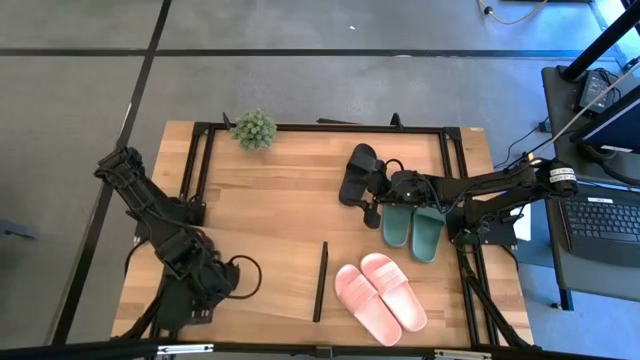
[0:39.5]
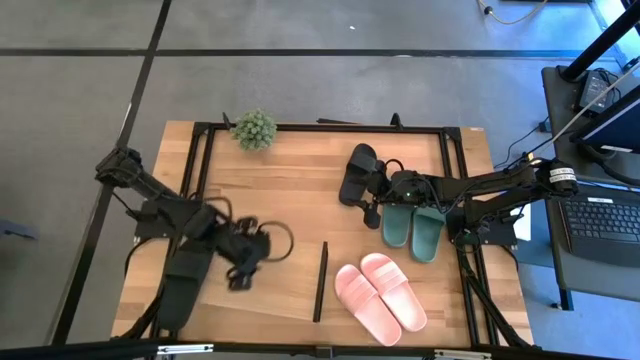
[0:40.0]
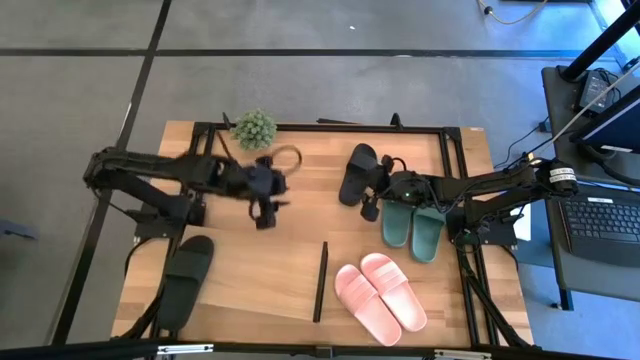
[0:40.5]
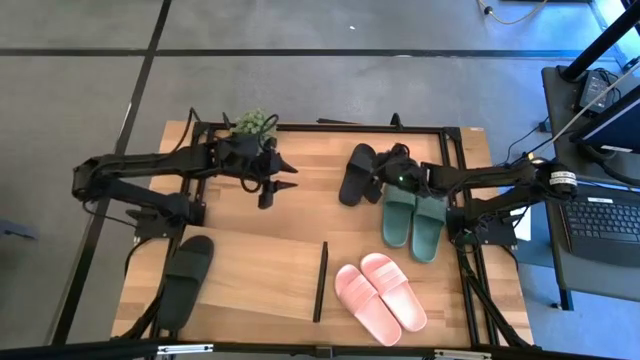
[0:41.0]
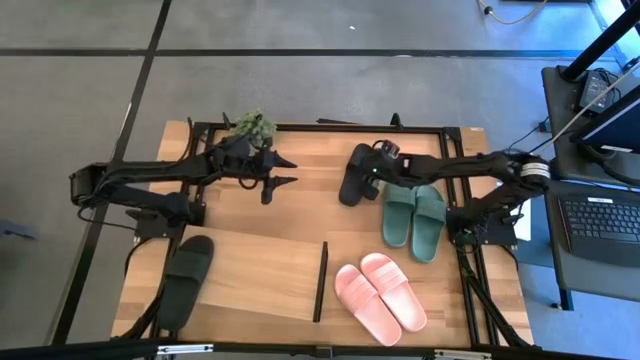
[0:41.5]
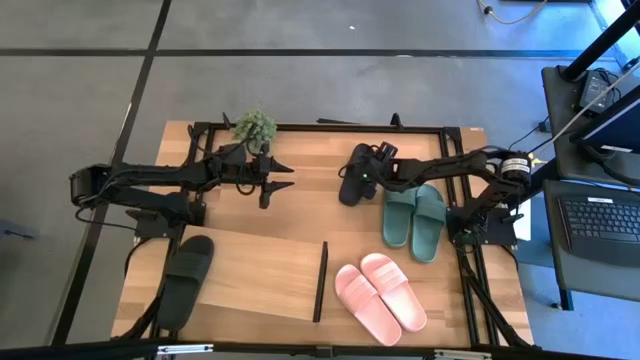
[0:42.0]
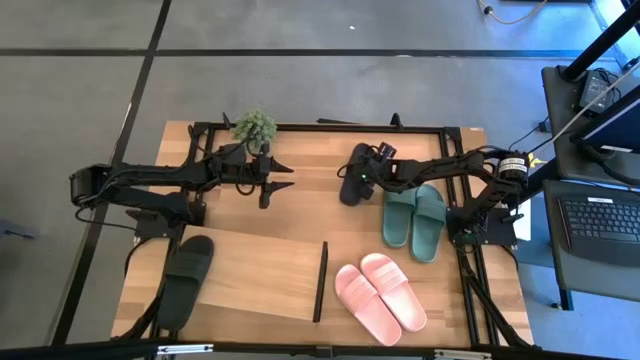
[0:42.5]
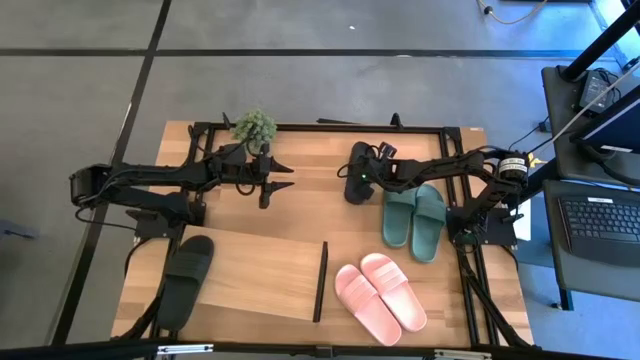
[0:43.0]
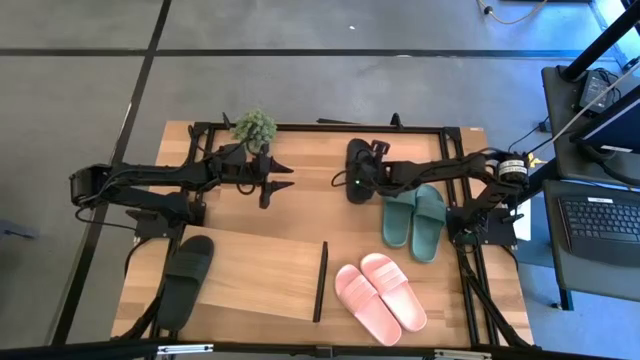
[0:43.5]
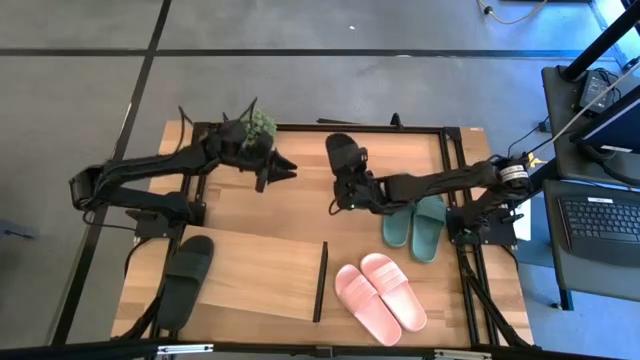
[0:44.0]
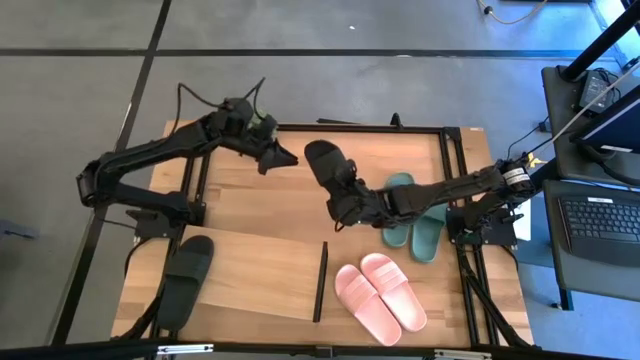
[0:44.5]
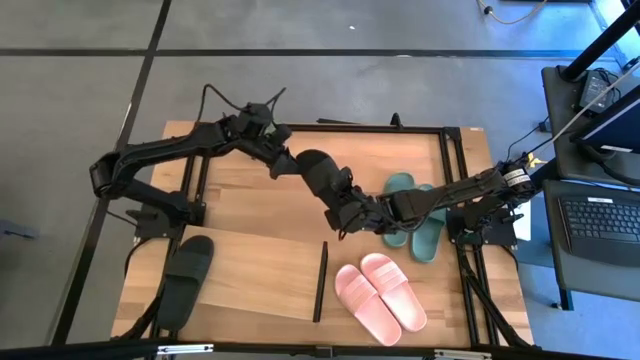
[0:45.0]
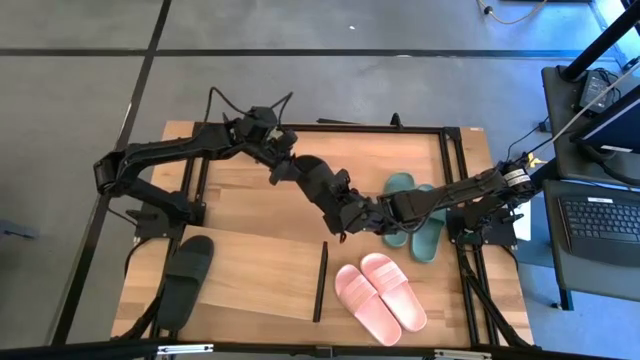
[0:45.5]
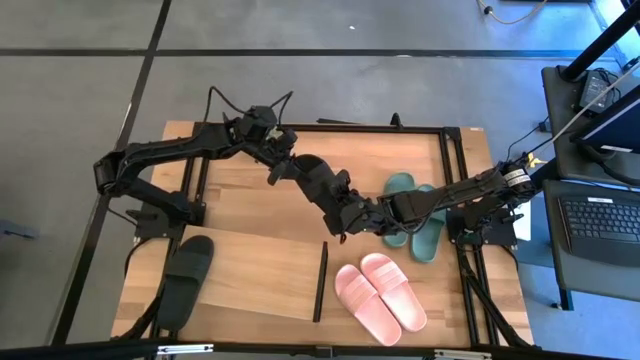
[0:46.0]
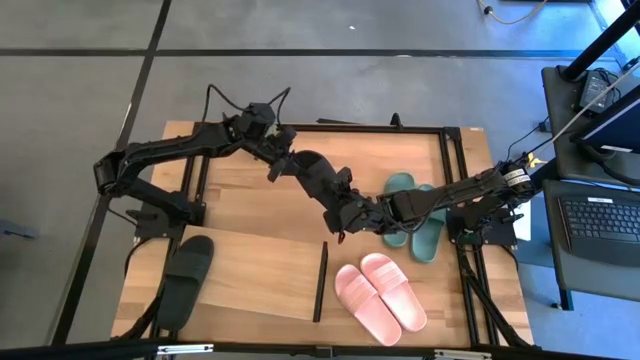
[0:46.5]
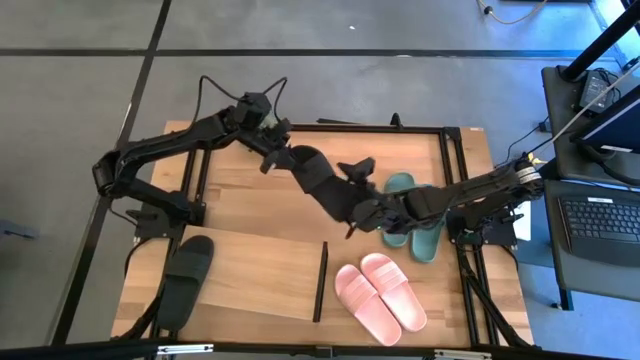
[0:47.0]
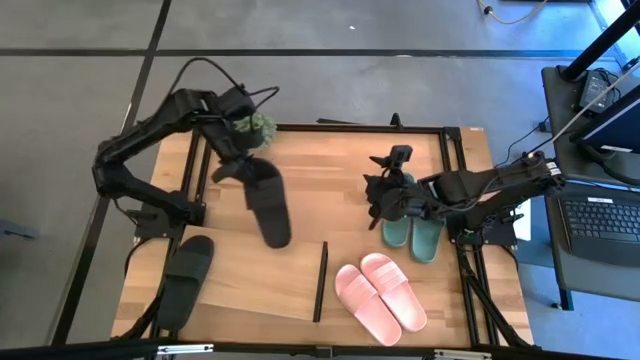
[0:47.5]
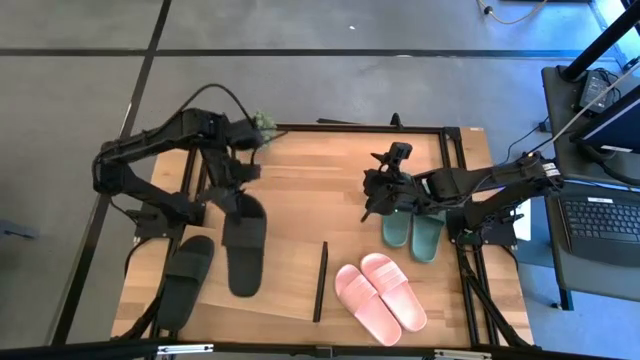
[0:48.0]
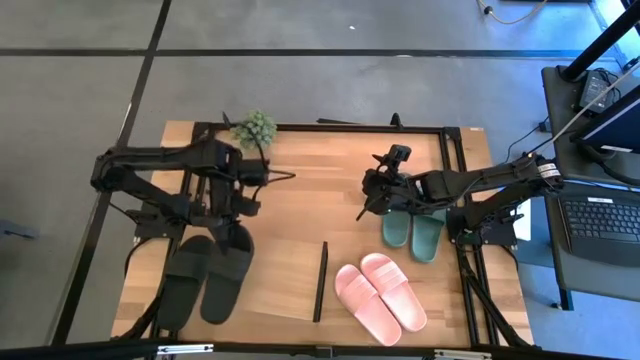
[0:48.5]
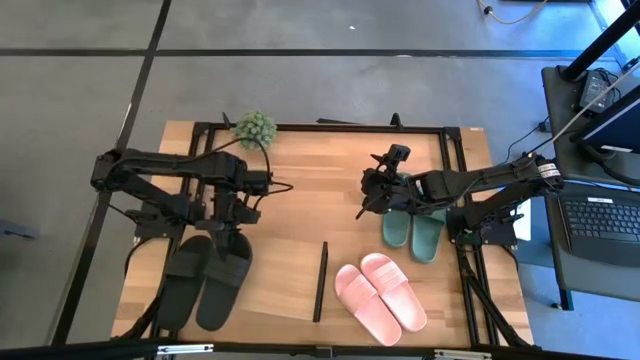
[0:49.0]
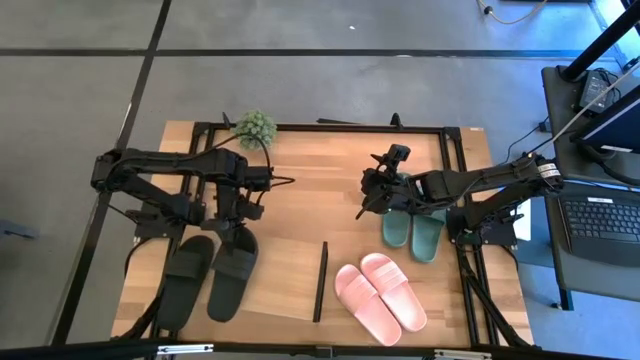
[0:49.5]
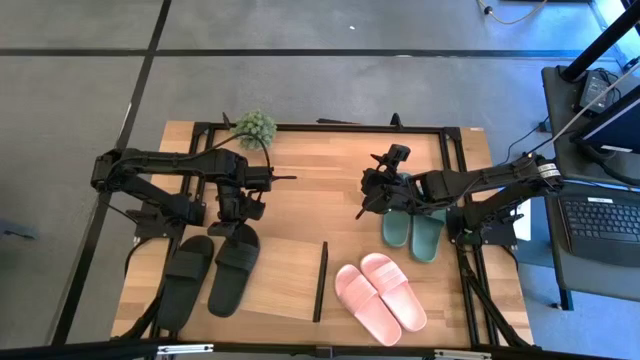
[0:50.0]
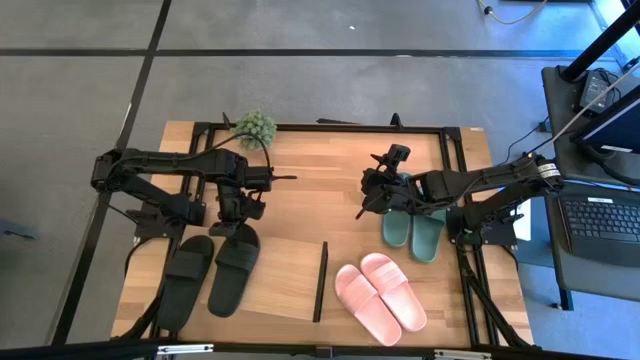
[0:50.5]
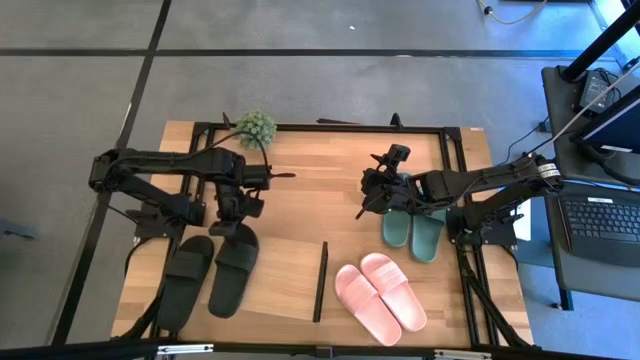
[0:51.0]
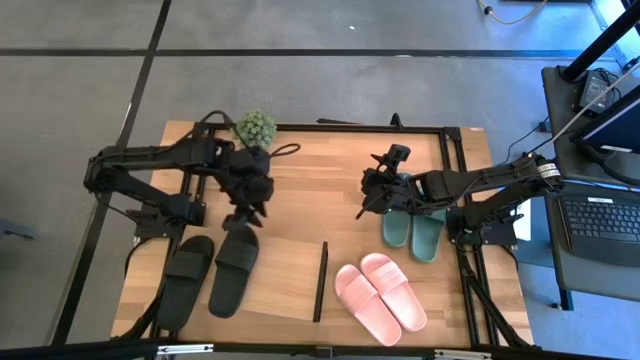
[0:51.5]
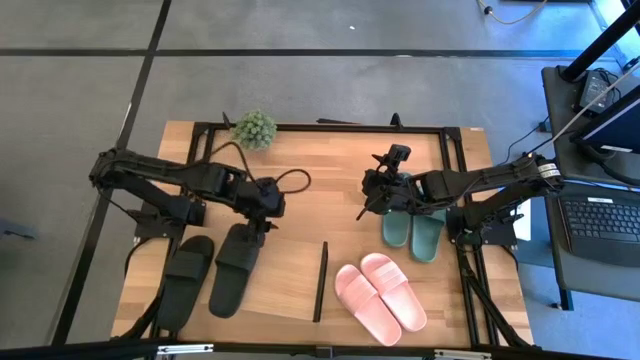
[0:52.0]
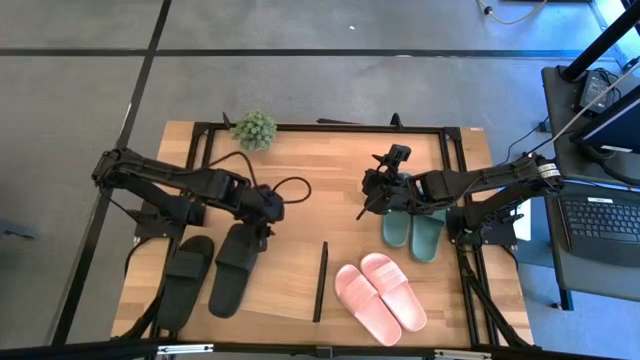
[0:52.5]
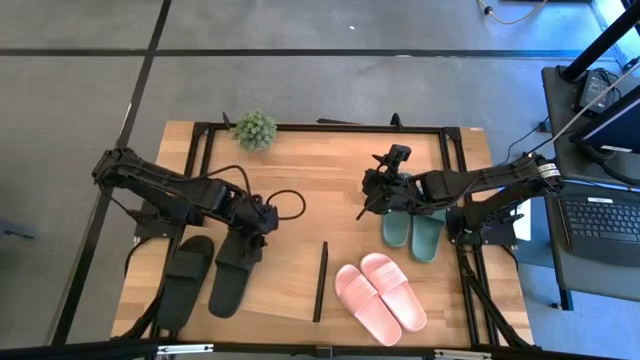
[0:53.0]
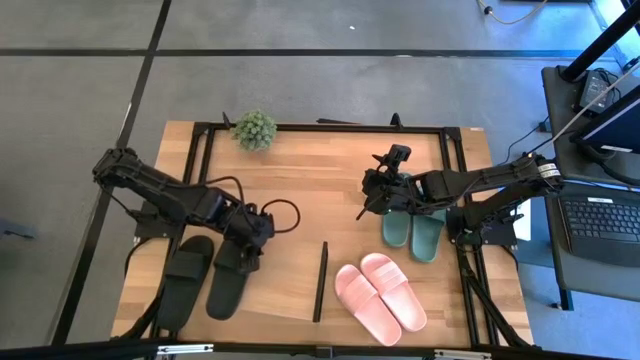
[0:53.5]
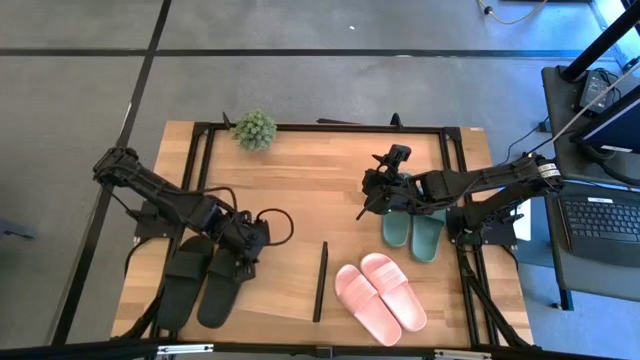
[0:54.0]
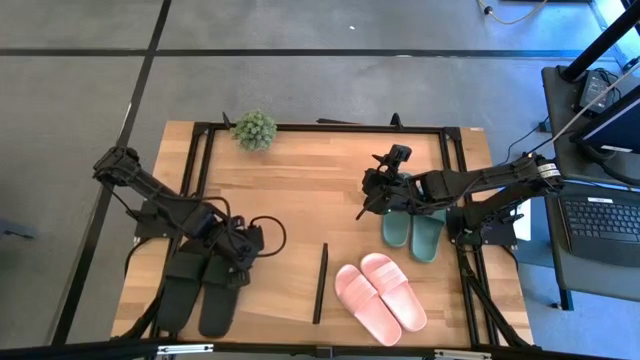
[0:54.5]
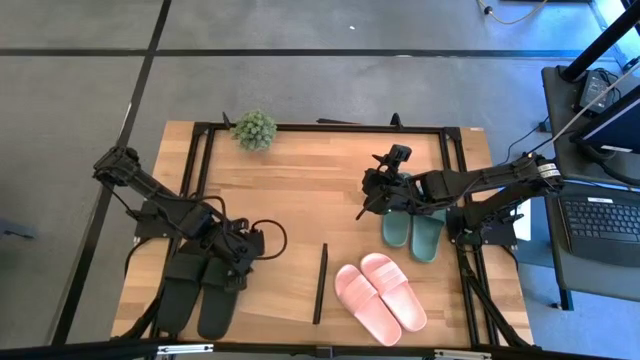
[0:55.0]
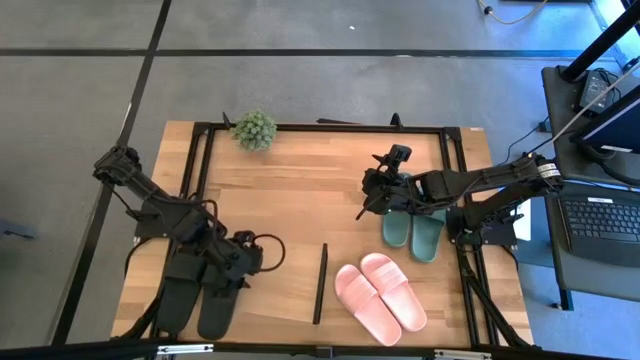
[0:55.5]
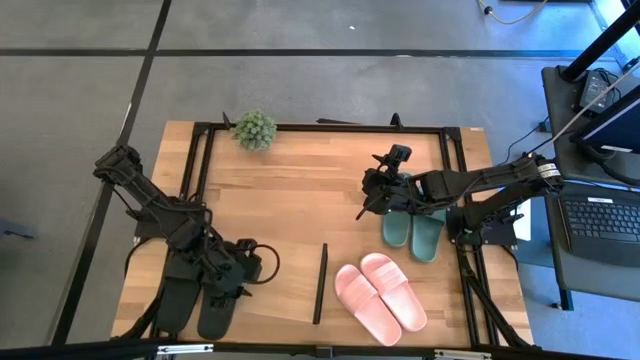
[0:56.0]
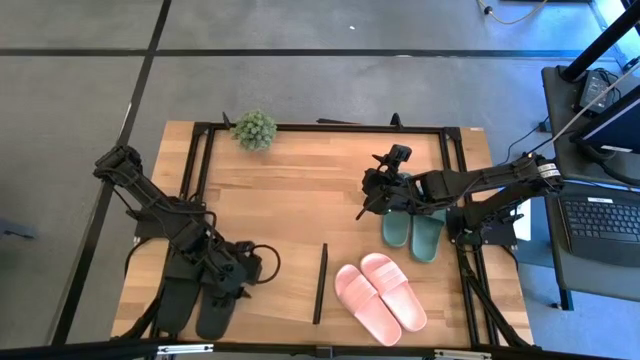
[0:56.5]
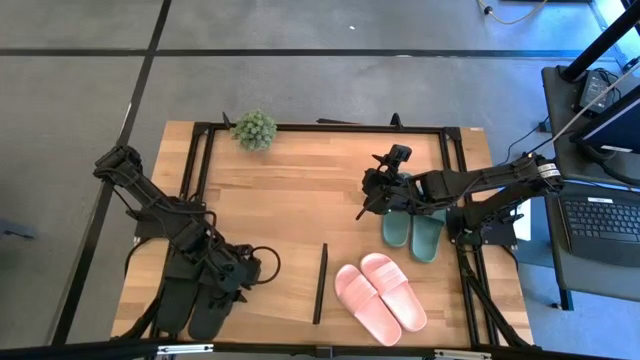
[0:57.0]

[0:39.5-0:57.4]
Task: Pick and place slides into the shelf
Put the black slipper on the shelf

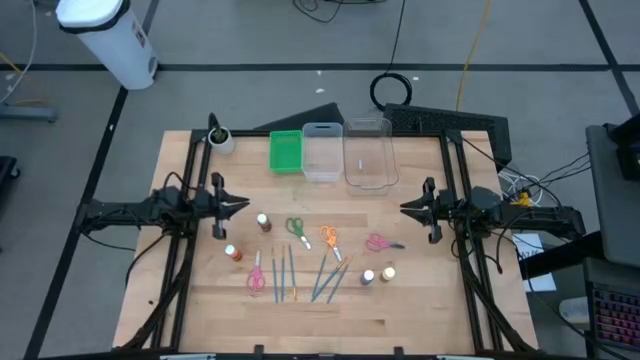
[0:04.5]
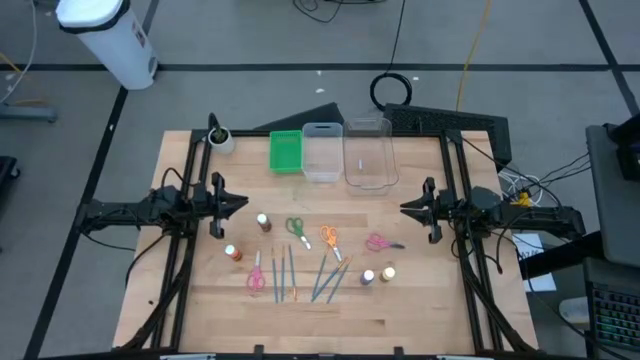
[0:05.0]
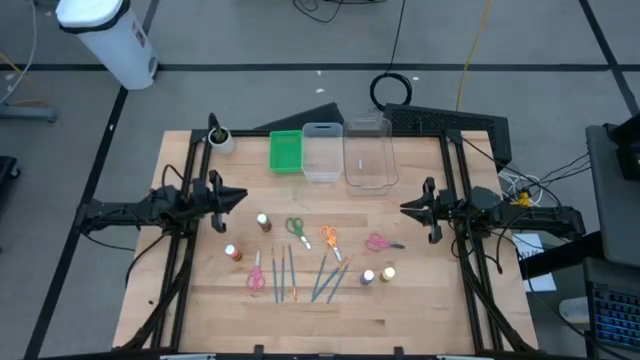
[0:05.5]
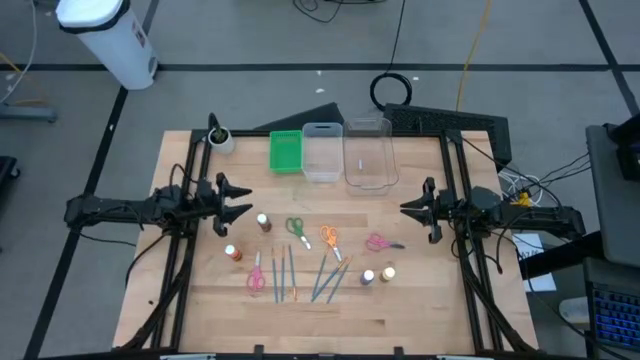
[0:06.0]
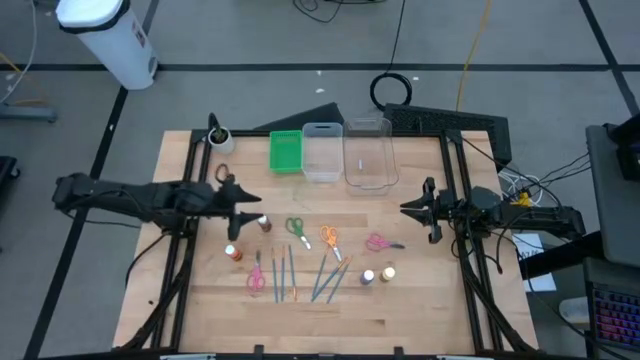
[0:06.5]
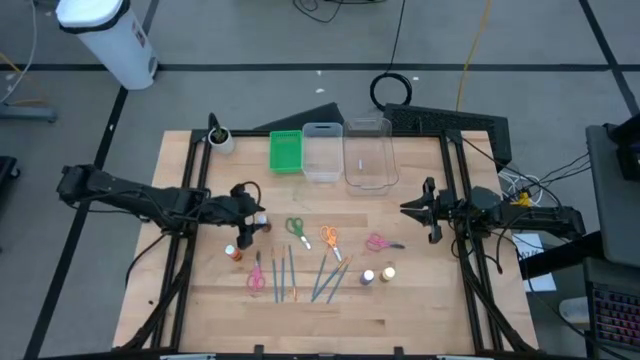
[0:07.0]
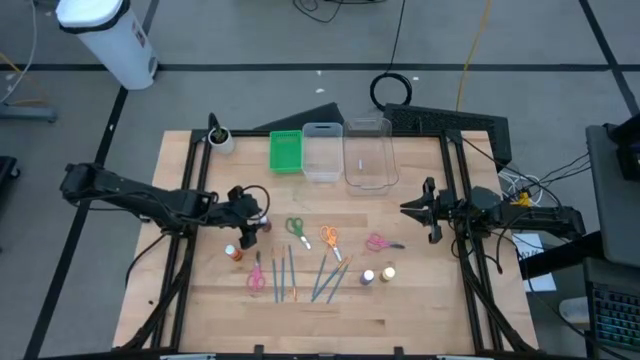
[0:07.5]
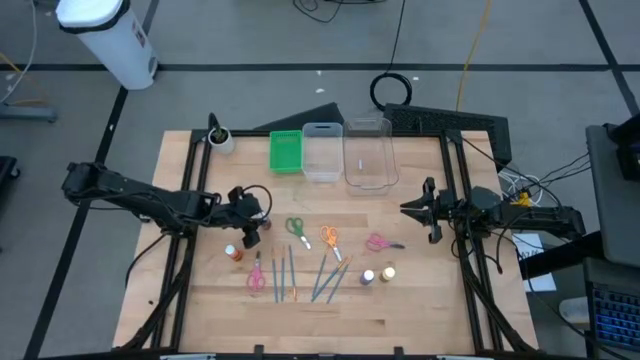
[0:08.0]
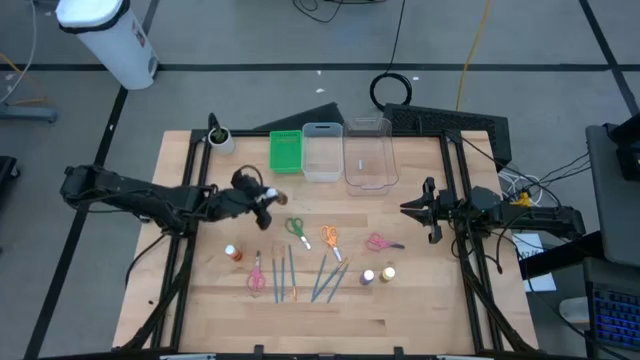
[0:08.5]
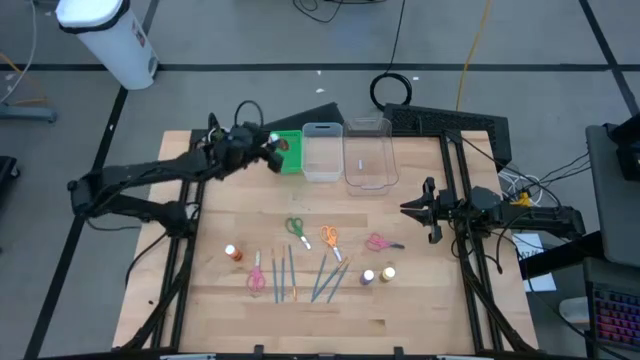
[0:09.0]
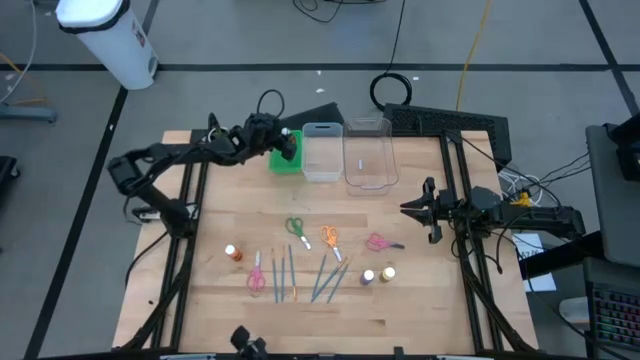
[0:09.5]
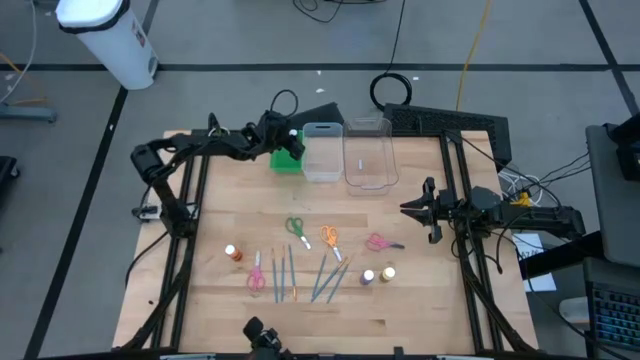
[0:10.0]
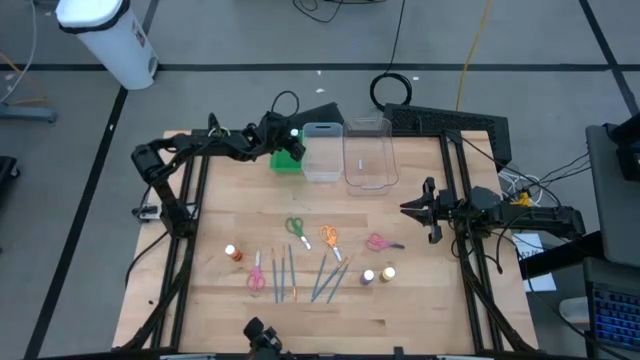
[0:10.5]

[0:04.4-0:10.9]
Task: Pick & Place Paint Supplies
Put the brown paint bottle into the green bin
